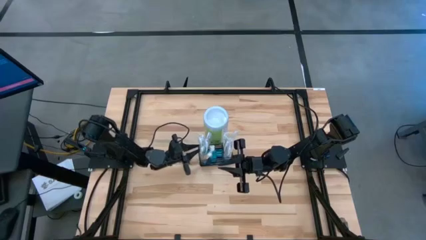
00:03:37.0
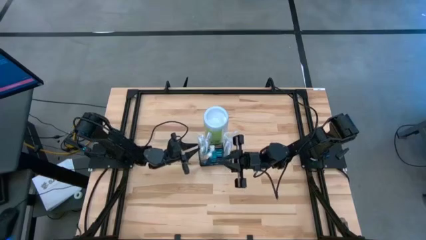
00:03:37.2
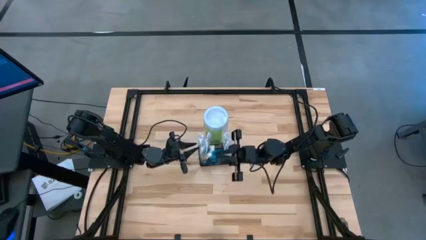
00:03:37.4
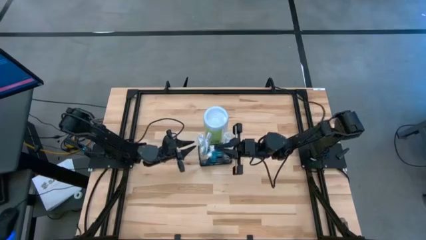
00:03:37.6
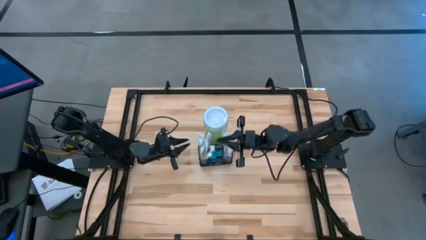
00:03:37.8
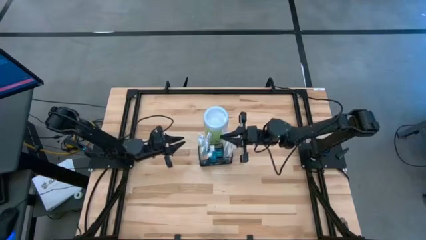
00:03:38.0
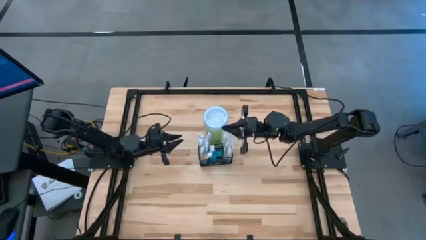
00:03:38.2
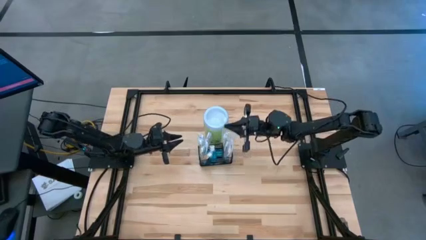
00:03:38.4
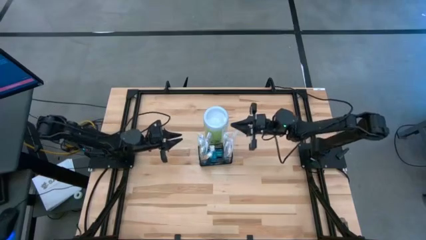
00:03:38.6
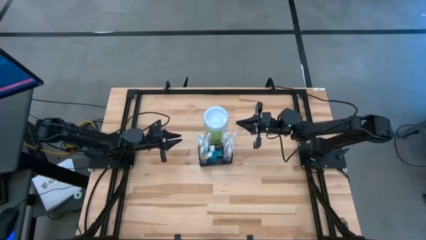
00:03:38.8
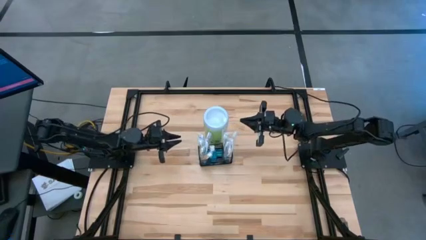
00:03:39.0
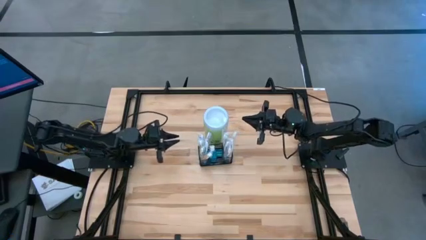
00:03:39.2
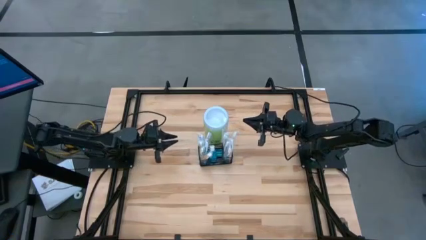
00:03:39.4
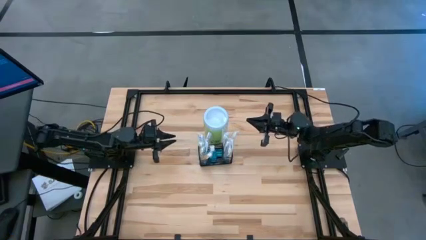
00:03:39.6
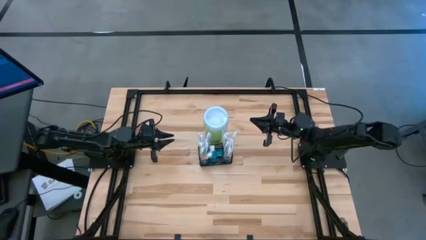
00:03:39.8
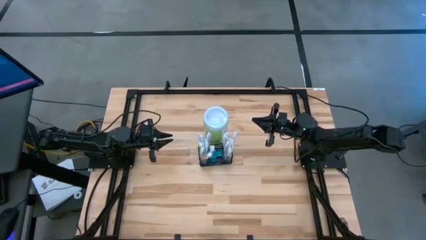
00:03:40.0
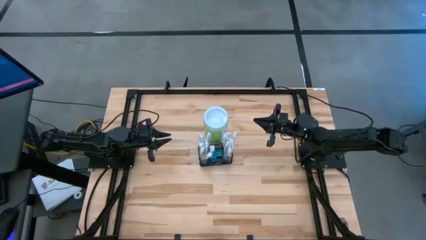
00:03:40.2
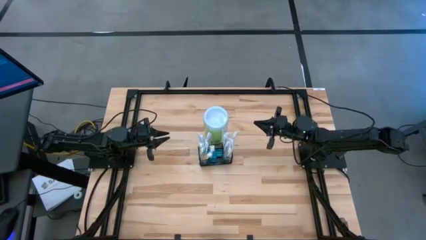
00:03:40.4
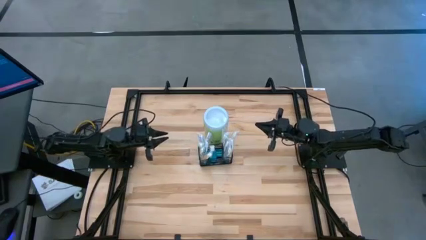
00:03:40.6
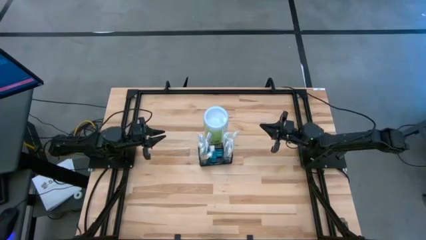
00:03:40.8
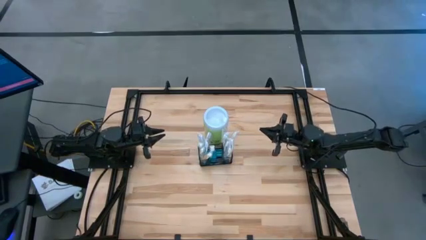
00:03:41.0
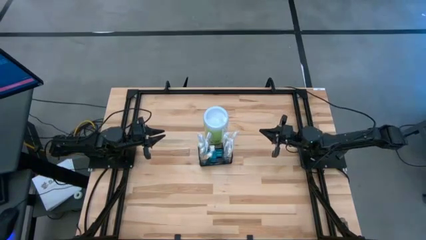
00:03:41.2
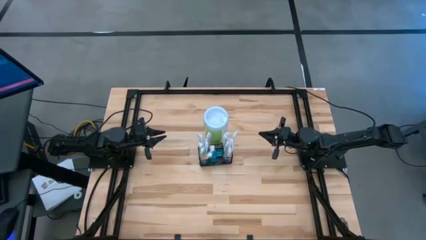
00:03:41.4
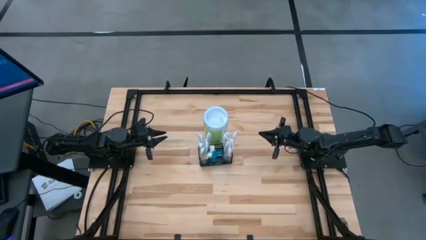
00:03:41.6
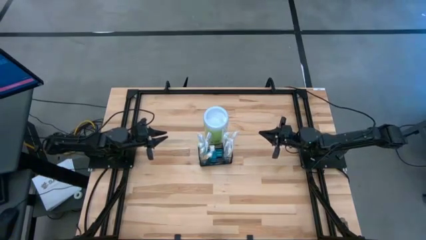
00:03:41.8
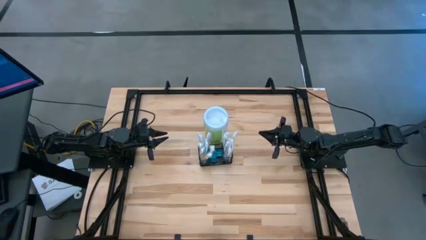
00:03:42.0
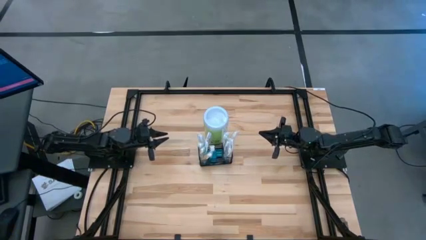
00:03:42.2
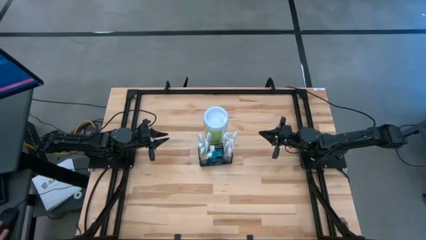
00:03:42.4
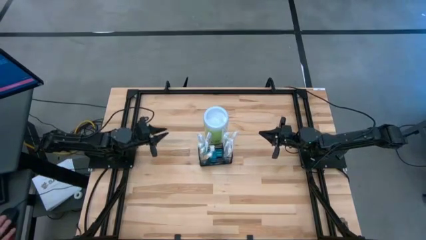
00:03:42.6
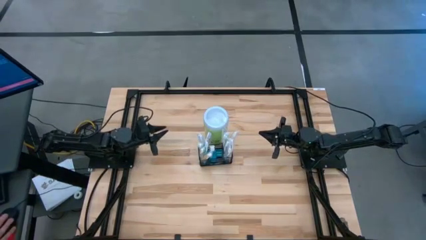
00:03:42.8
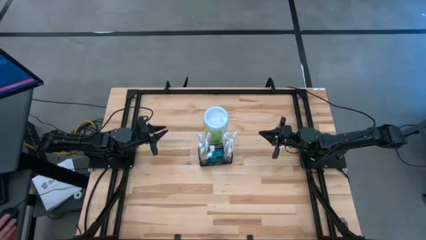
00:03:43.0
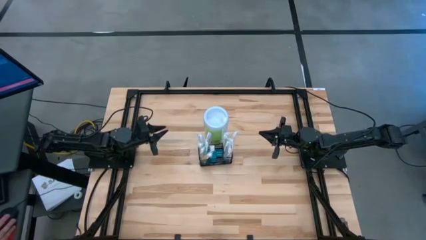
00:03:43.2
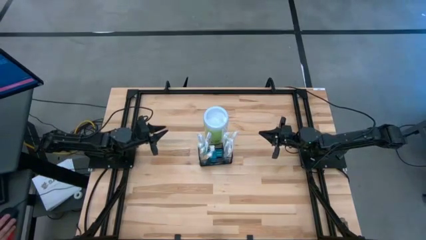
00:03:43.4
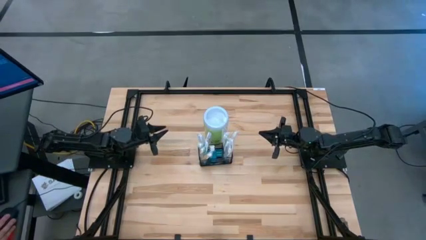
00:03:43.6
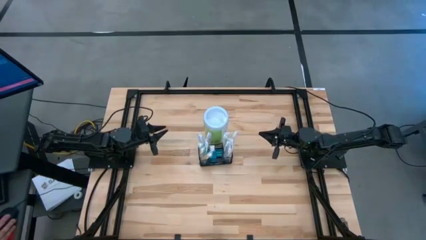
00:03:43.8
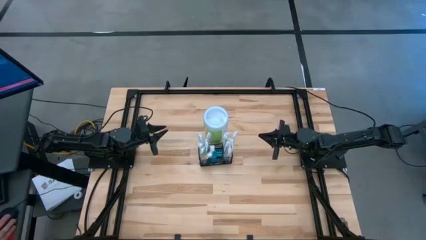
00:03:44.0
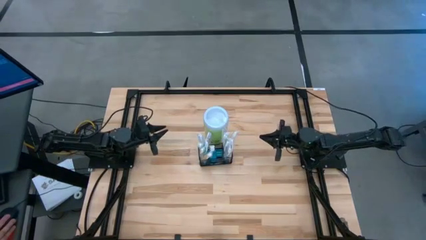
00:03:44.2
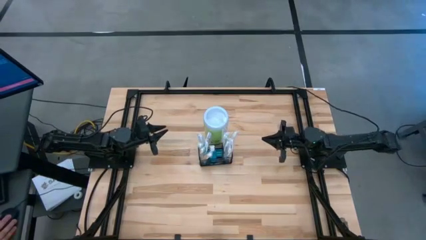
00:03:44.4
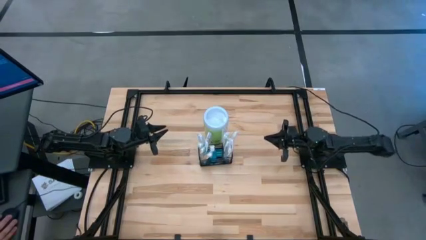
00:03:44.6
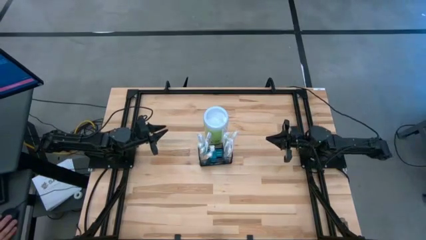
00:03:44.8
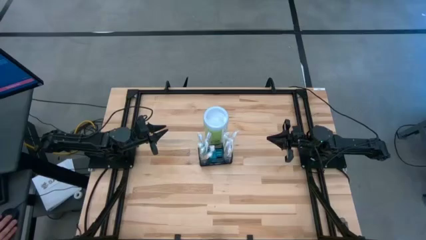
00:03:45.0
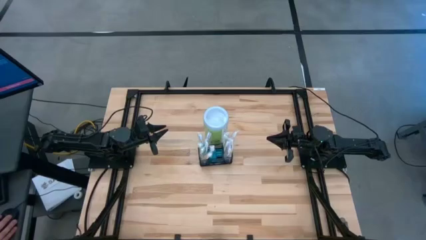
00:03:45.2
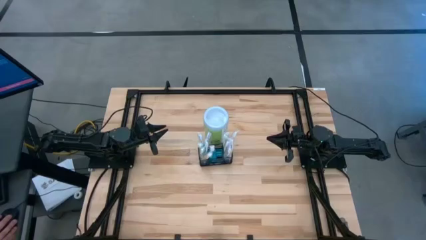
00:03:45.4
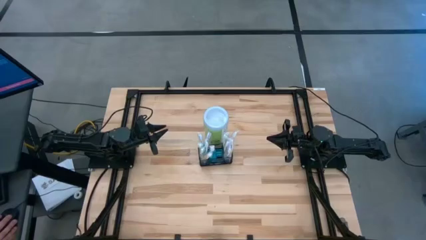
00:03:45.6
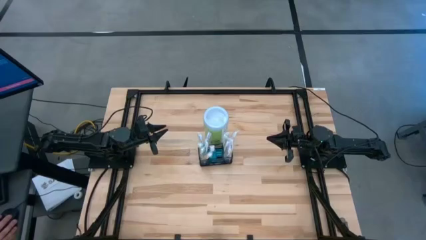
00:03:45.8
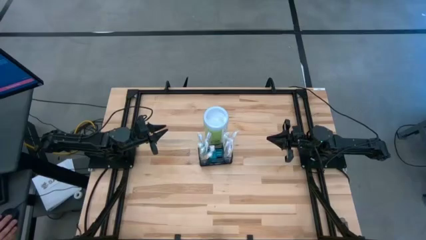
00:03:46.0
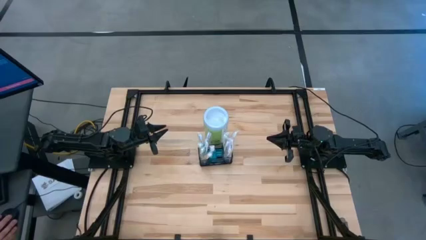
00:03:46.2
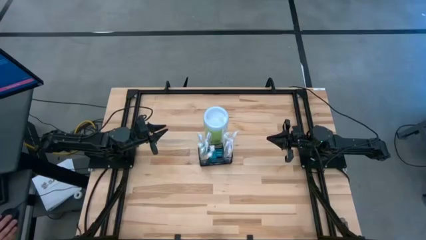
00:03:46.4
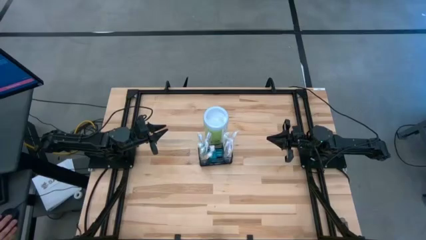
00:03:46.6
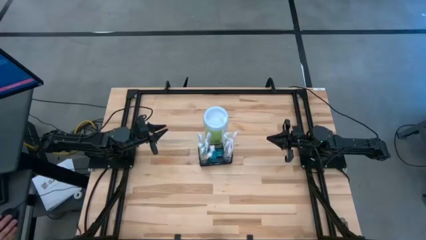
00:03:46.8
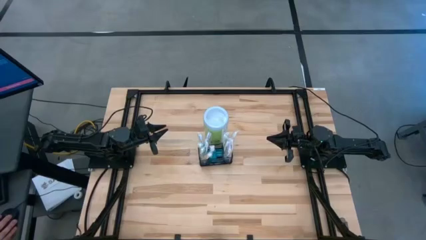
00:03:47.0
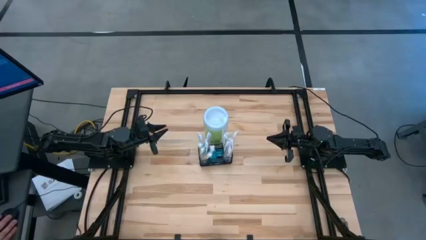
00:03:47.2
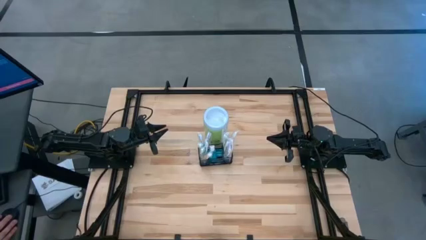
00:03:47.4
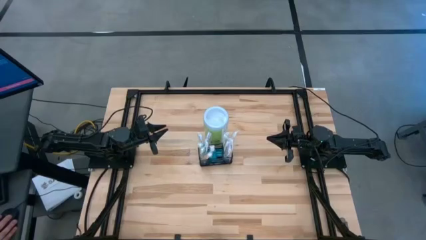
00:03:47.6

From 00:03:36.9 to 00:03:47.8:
Task: Pick & Place toothbrushing station
Return to Home Position

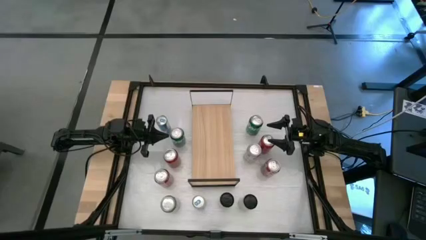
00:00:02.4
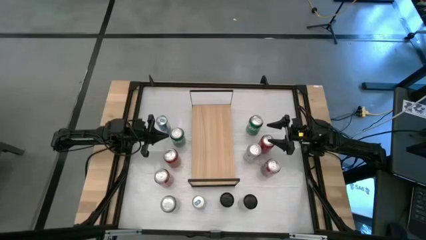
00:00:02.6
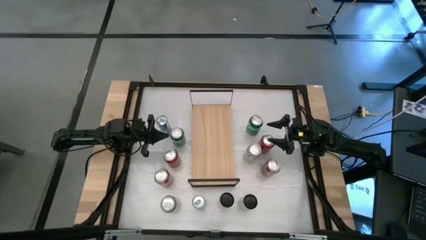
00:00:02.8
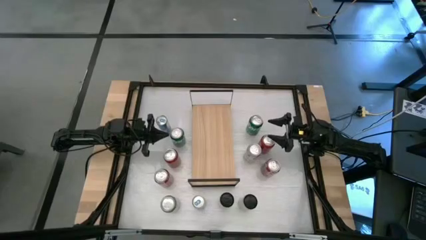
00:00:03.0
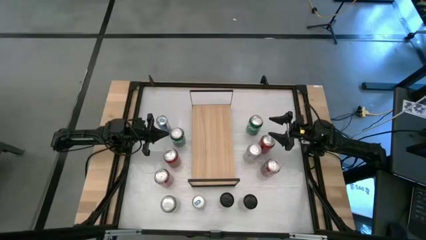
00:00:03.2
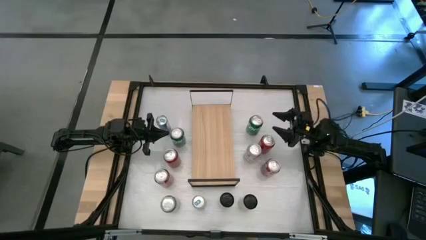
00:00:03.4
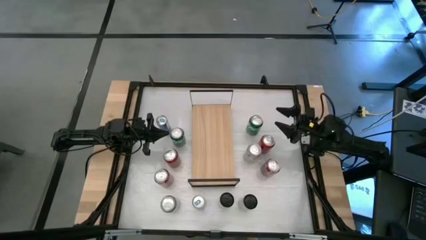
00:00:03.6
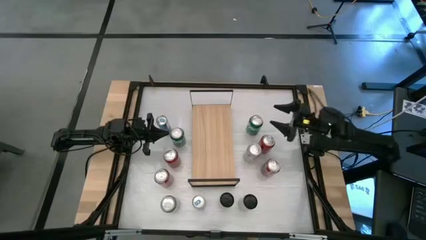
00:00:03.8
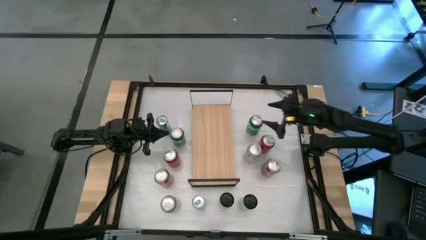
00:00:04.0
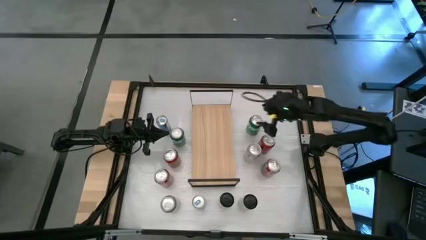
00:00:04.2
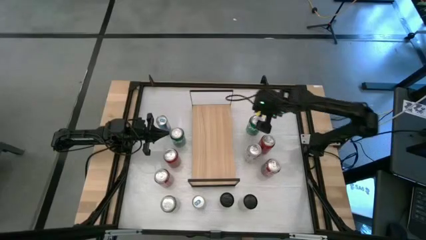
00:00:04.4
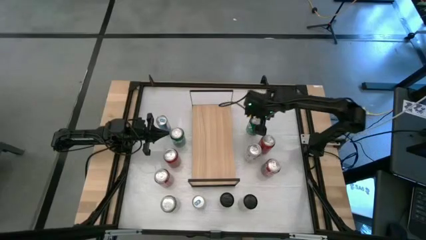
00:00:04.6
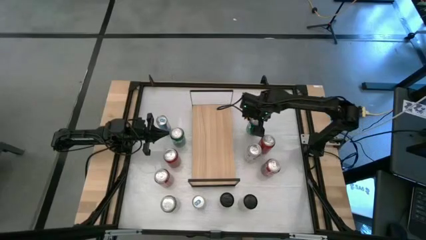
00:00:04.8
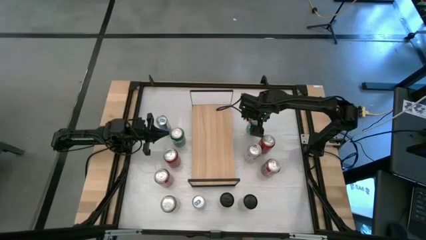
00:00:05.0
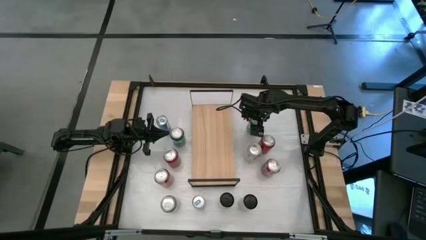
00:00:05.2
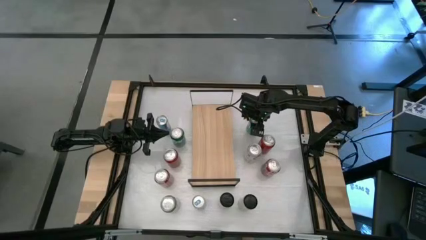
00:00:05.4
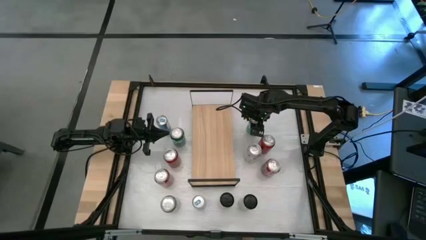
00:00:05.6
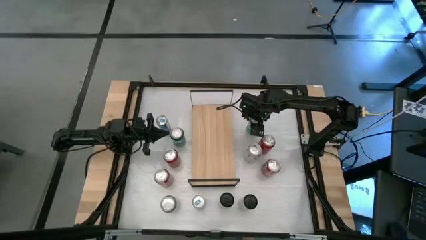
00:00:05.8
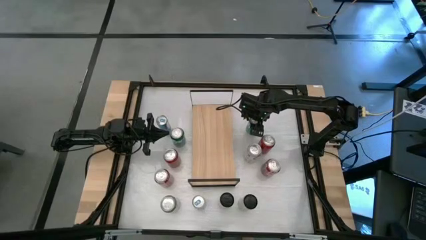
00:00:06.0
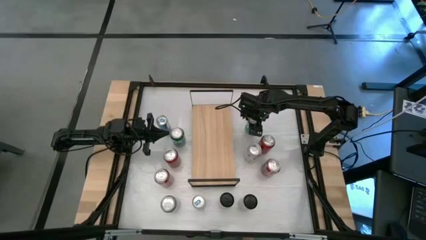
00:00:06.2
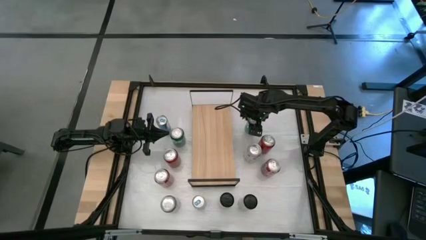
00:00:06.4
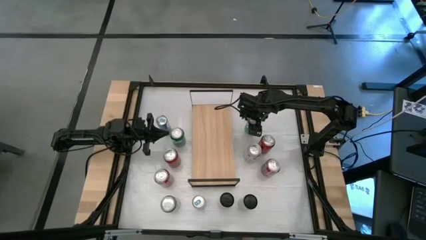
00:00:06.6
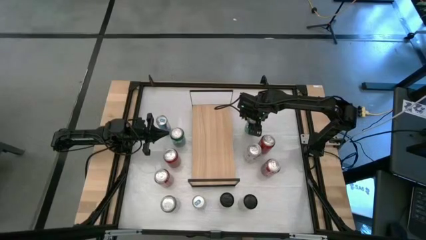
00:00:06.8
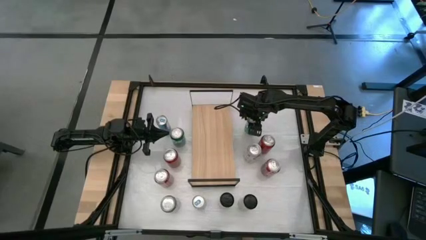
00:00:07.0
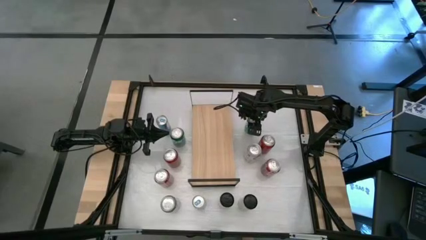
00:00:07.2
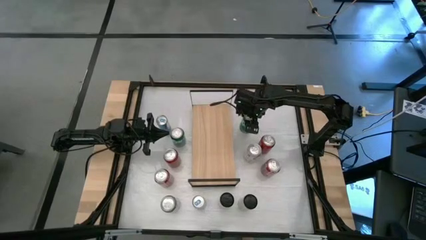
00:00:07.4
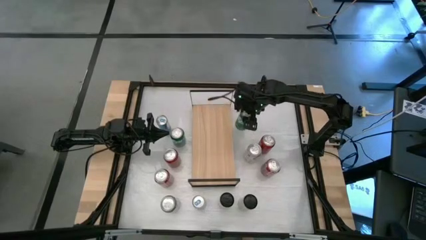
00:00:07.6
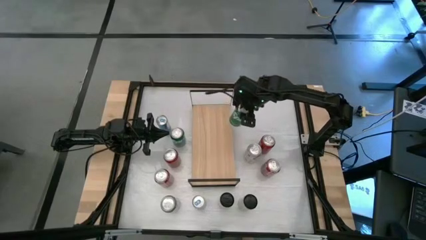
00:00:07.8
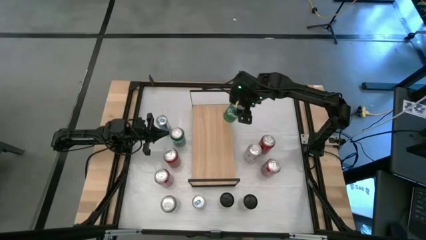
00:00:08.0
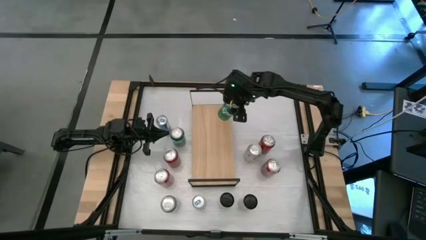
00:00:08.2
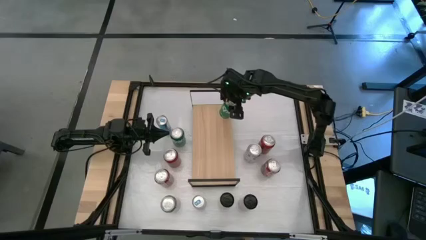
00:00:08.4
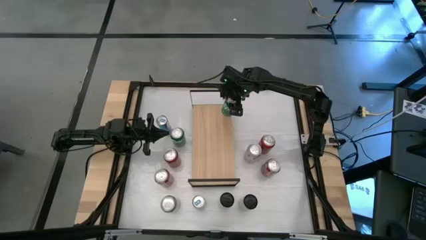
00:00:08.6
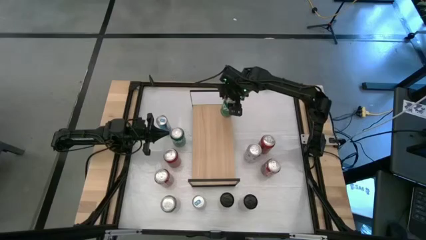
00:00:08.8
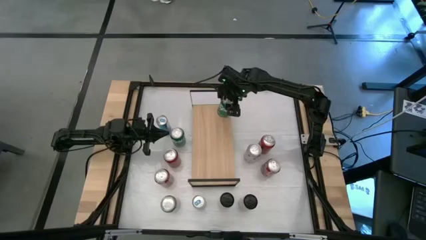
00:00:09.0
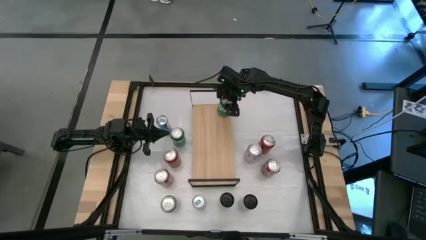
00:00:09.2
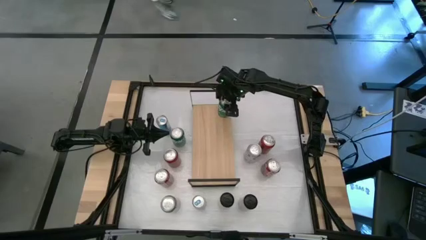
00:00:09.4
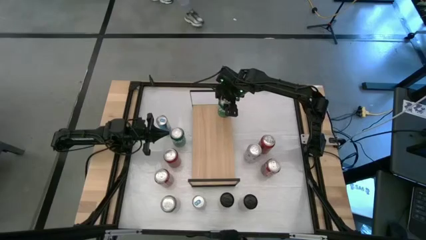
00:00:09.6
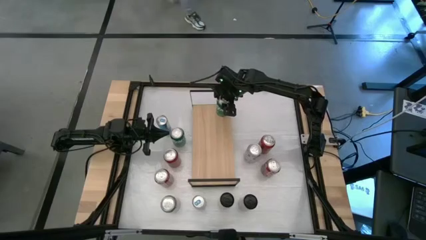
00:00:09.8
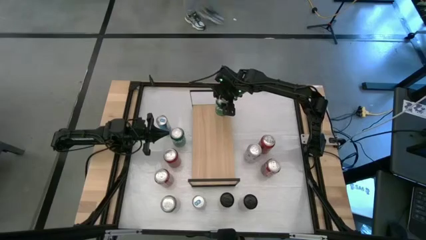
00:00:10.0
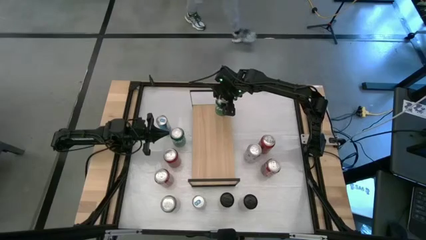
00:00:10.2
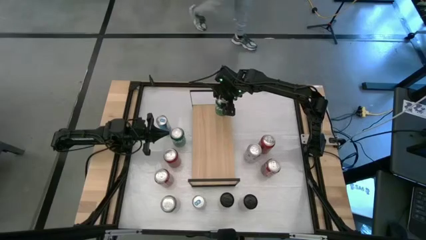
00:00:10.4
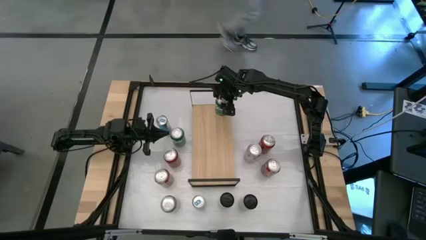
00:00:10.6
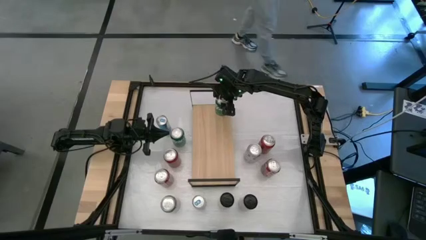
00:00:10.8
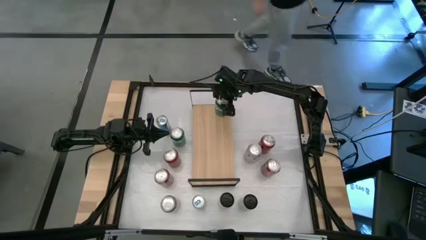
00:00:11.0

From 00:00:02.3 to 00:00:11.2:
Task: Place canned beverage on shelf
Put the right green soda can on the shelf
